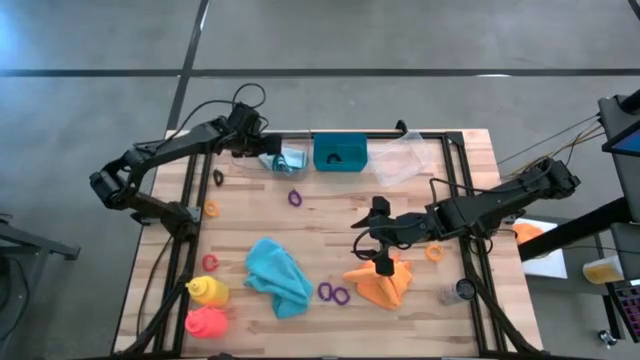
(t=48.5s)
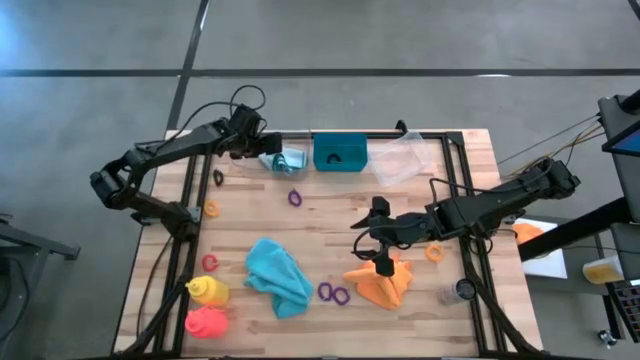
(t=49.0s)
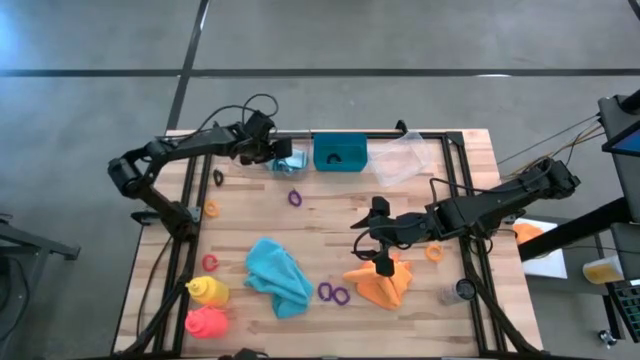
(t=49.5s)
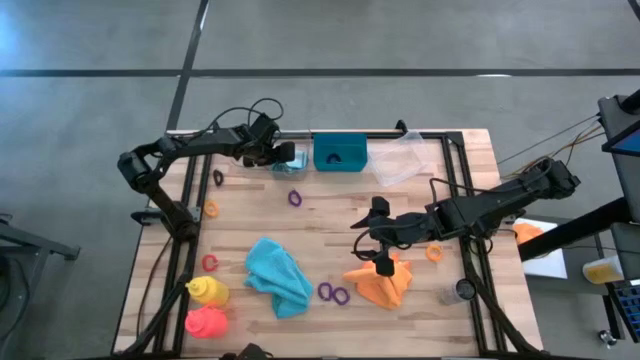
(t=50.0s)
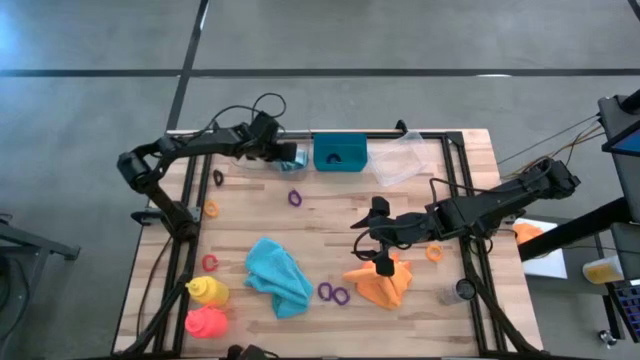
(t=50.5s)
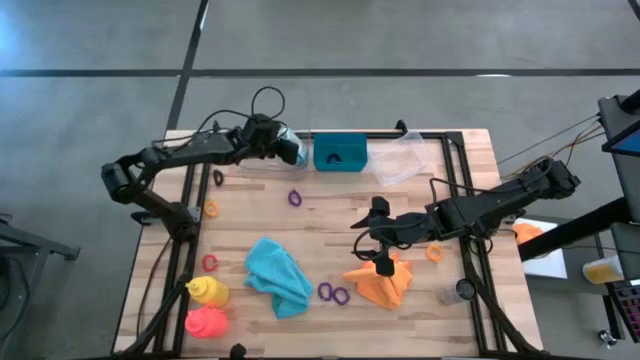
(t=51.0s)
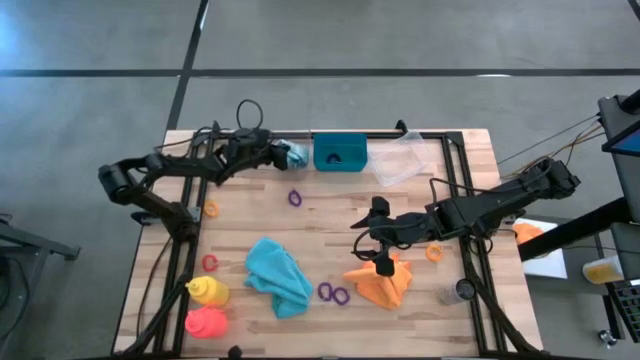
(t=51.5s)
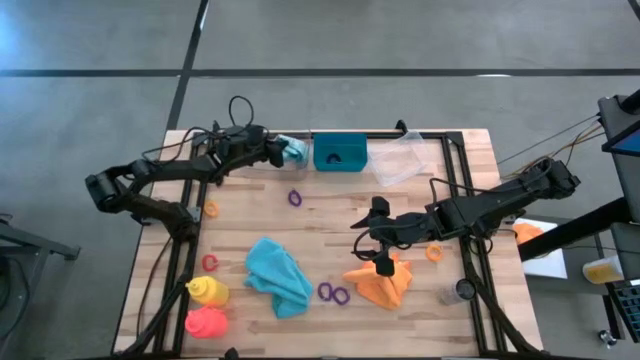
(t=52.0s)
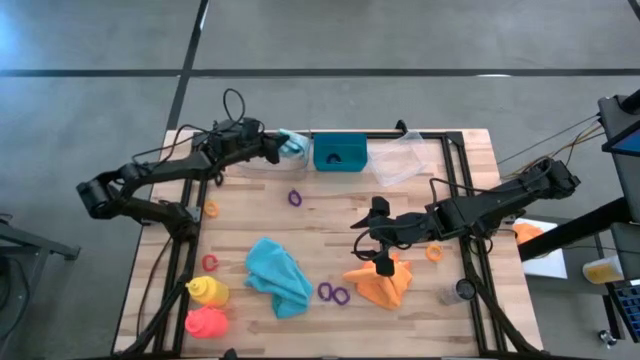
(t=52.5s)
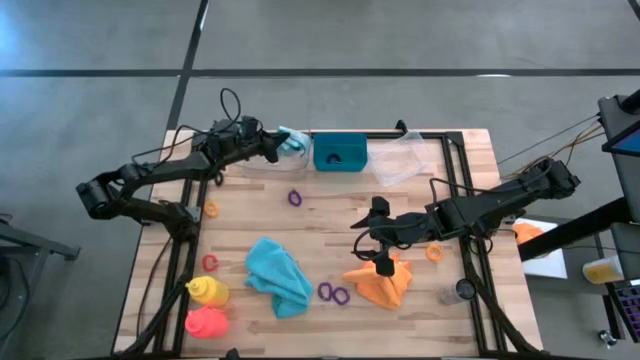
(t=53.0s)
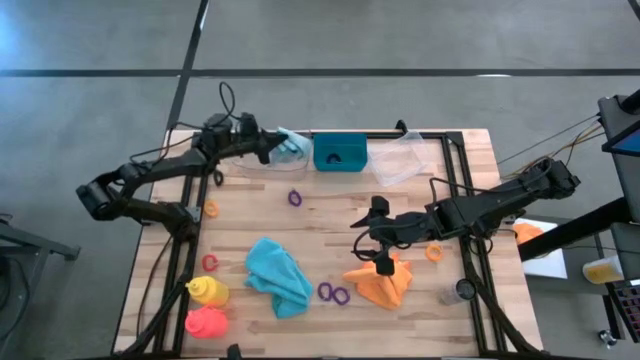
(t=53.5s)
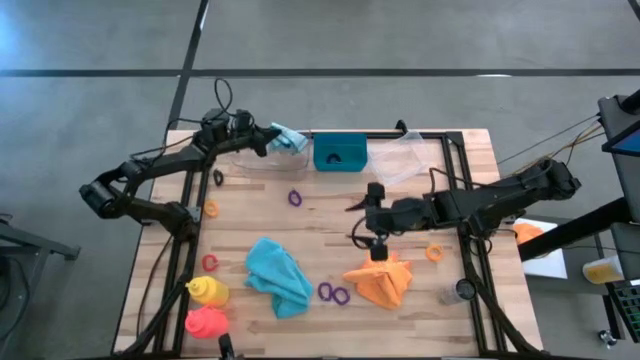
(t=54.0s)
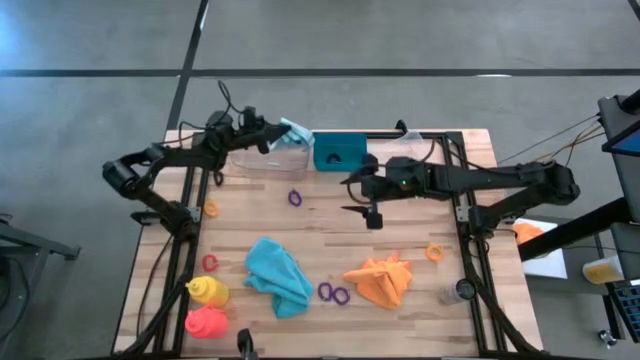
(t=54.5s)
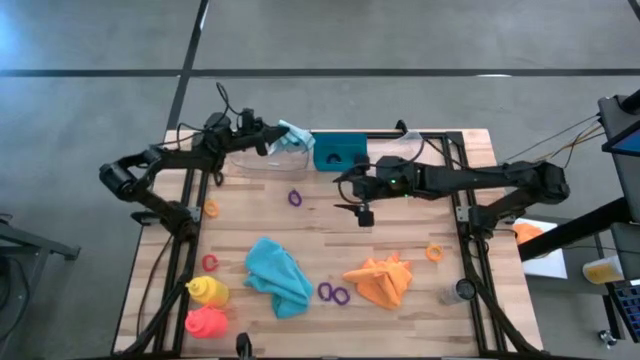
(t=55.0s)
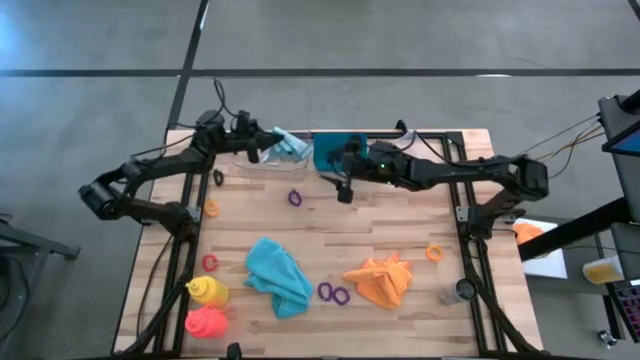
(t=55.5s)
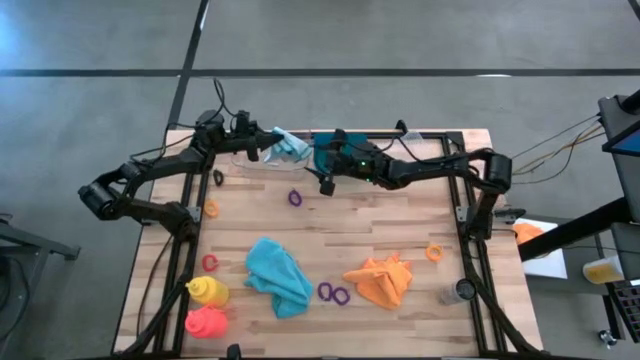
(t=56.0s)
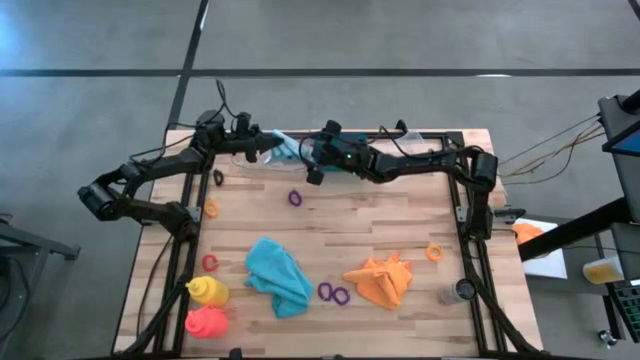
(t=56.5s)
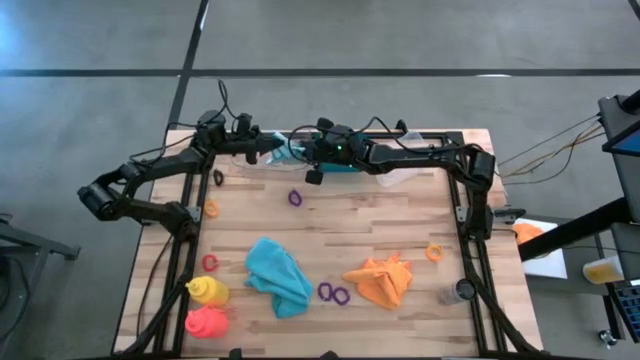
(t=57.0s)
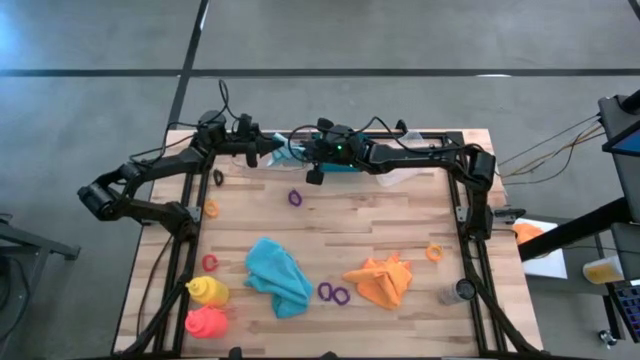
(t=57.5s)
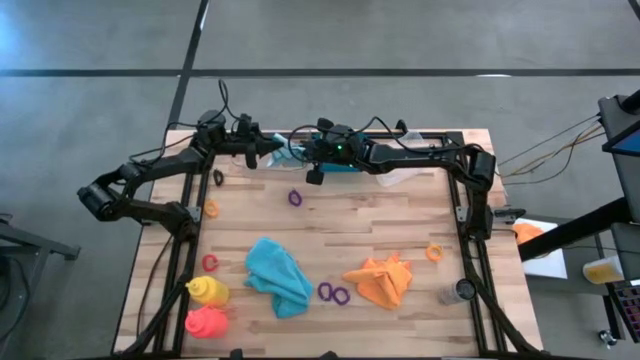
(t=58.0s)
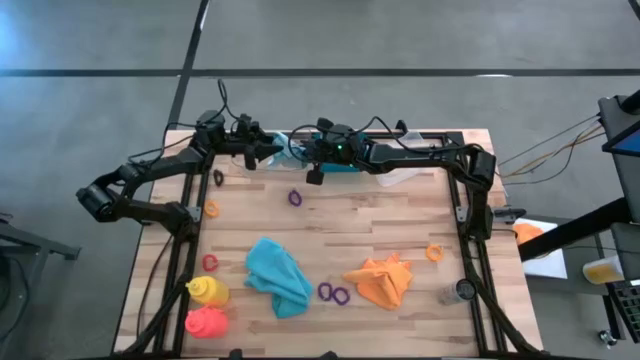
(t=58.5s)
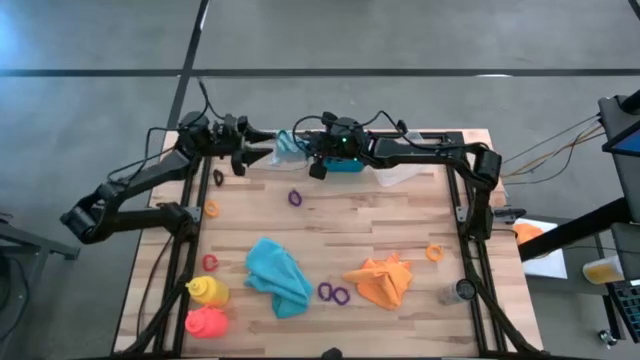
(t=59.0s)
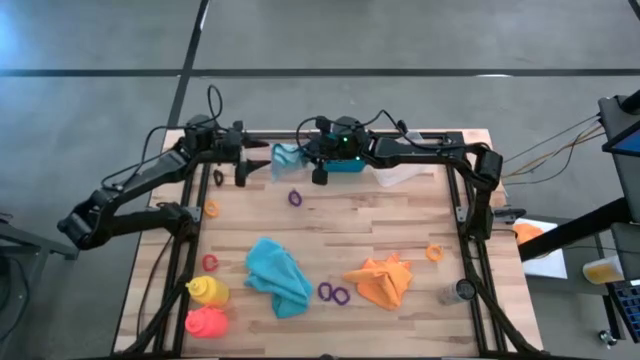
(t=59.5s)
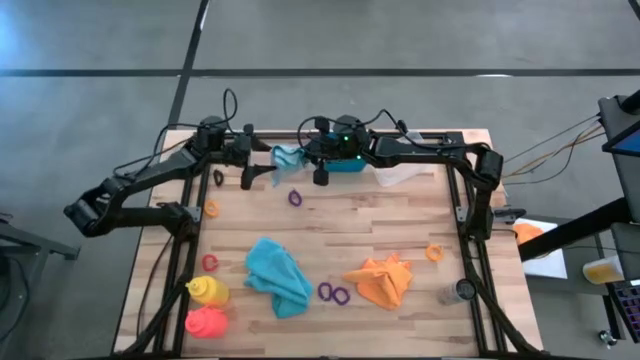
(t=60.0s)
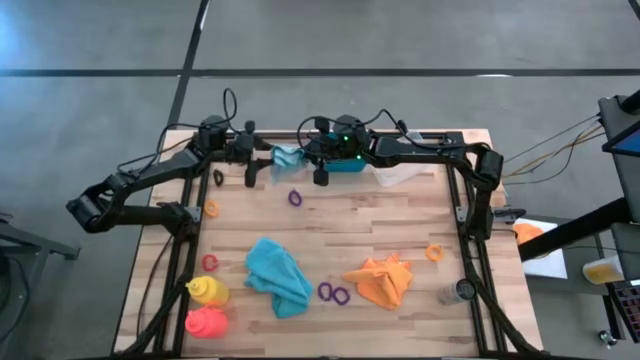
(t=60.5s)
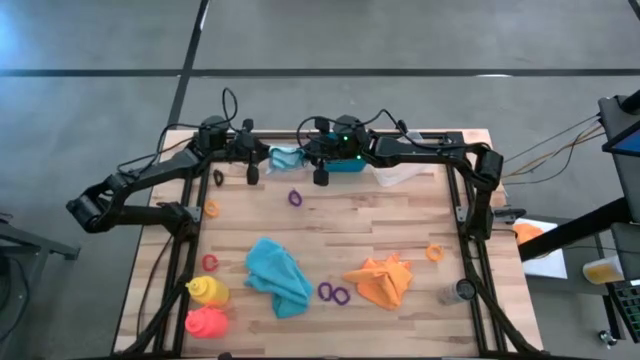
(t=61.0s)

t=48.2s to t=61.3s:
Task: Pick & Place Sports Items
Put the folded light blue towel into the transparent bin

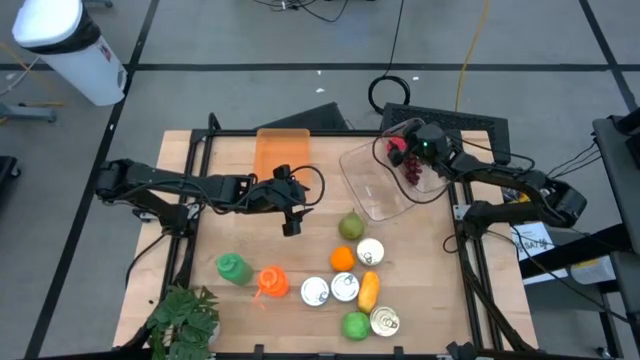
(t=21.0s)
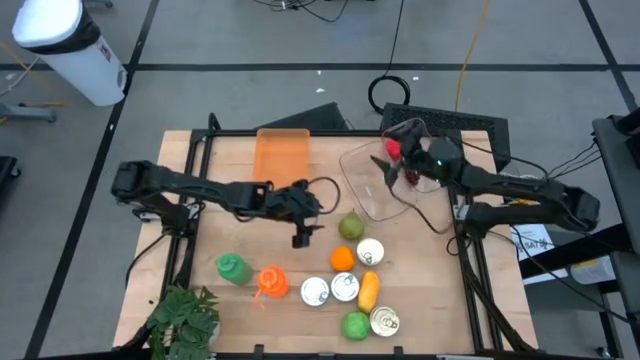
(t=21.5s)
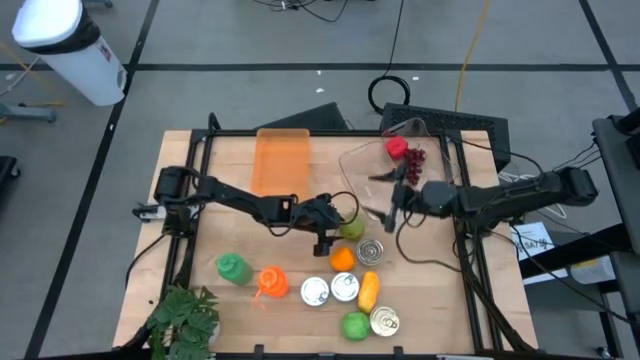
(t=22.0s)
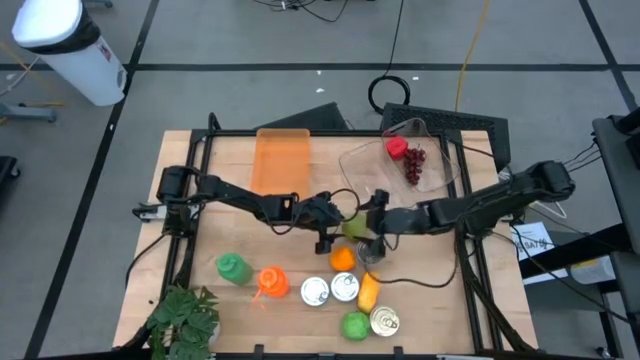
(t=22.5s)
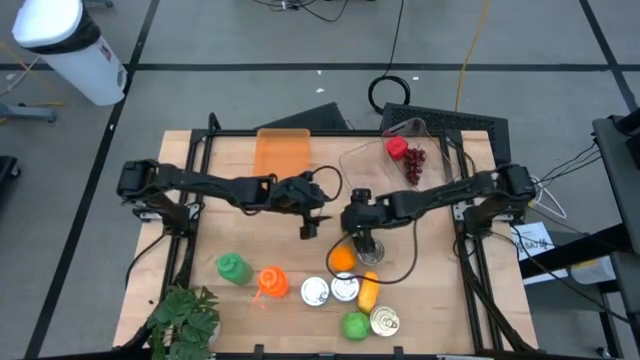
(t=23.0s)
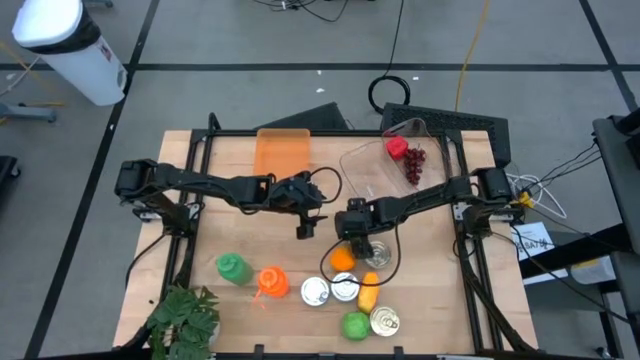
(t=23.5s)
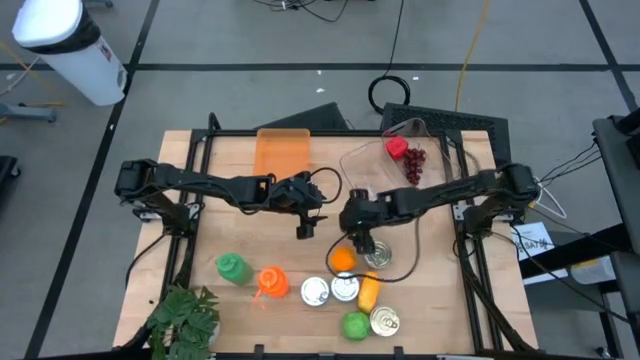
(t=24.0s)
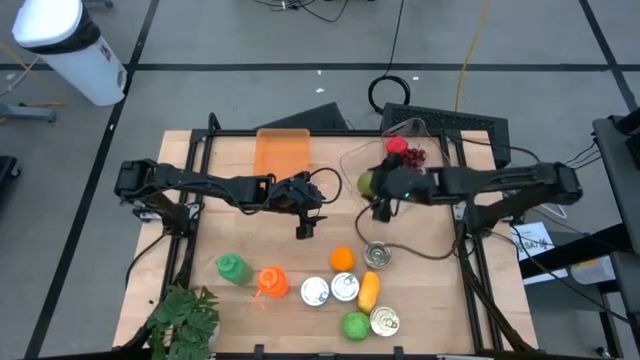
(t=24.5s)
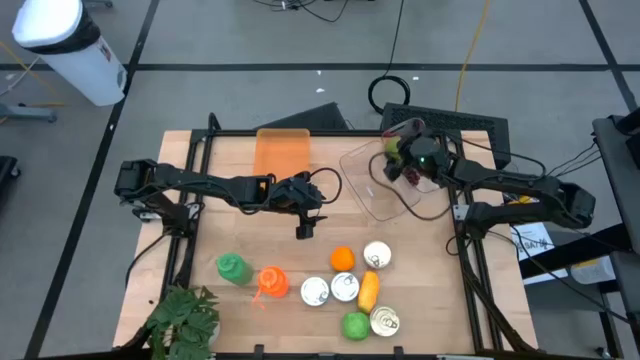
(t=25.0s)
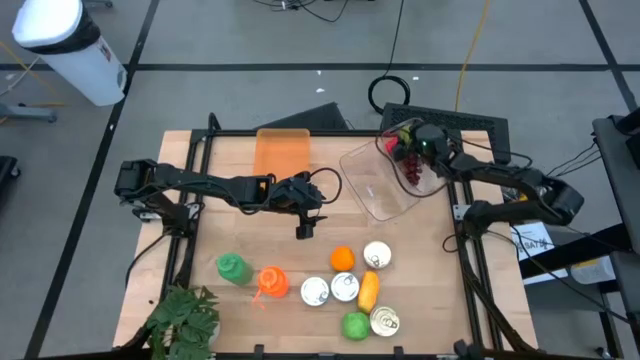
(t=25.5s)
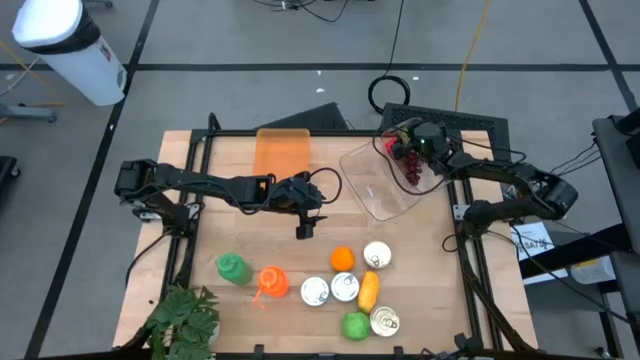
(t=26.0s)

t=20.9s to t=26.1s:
Task: Pick & Place Food Item
Put the green pear into the right transparent bin
